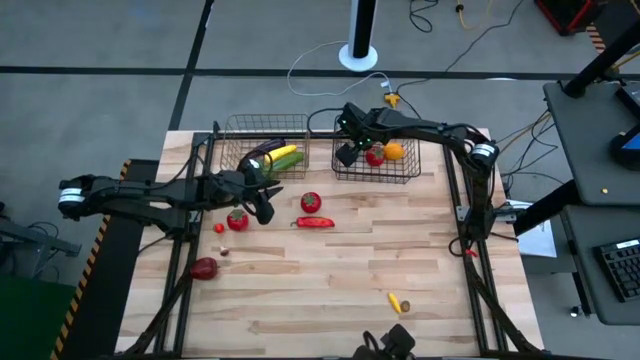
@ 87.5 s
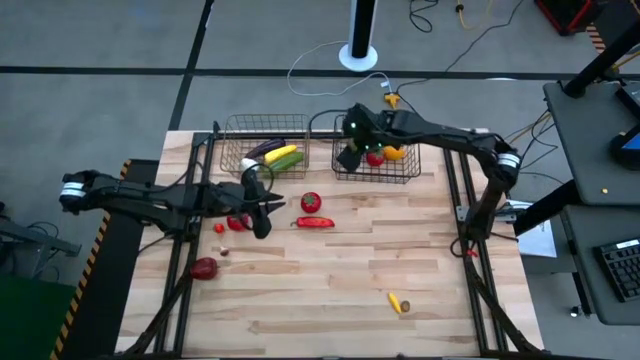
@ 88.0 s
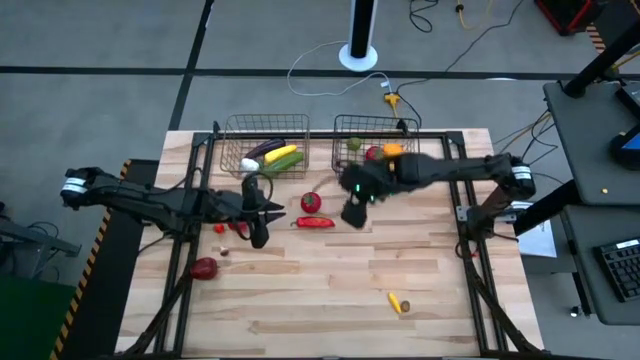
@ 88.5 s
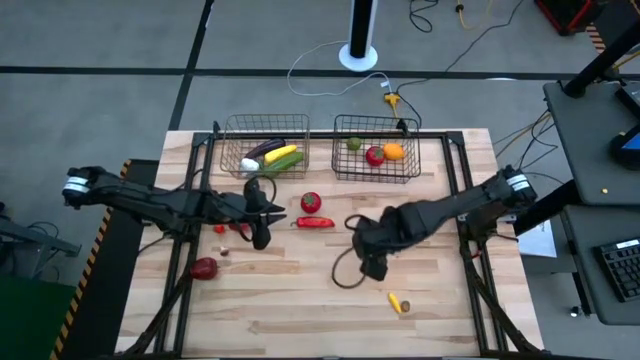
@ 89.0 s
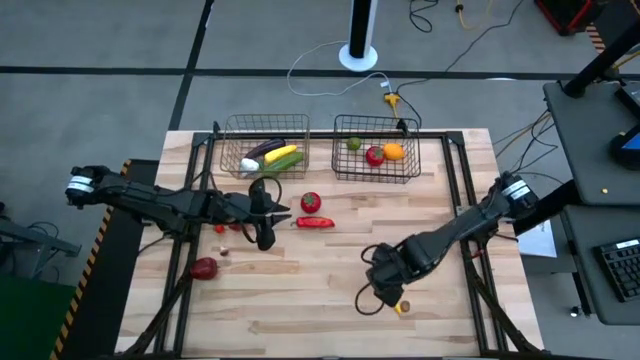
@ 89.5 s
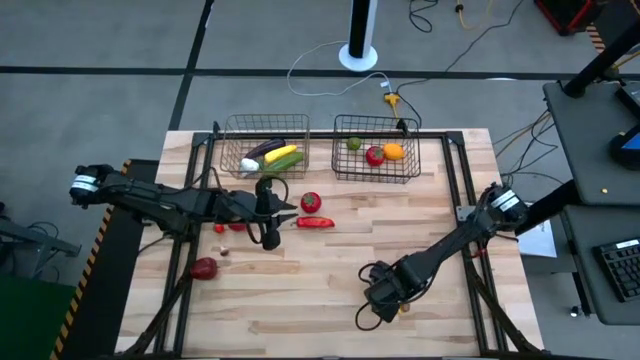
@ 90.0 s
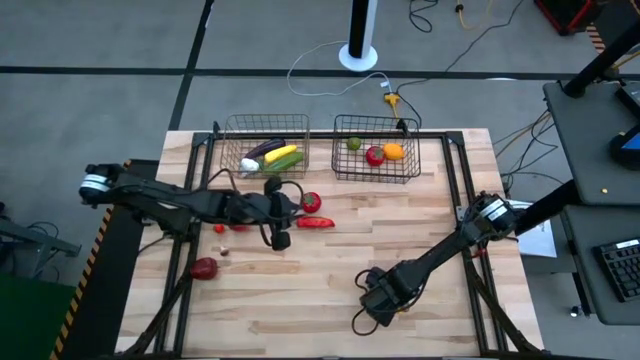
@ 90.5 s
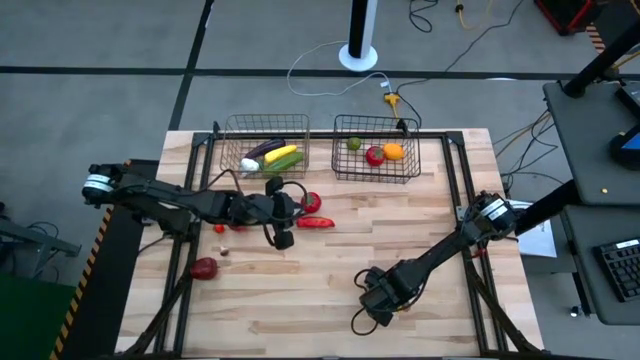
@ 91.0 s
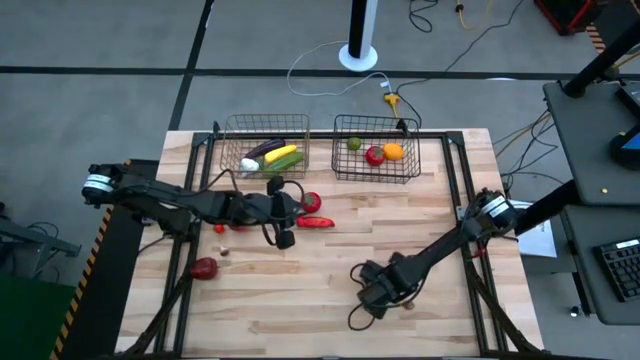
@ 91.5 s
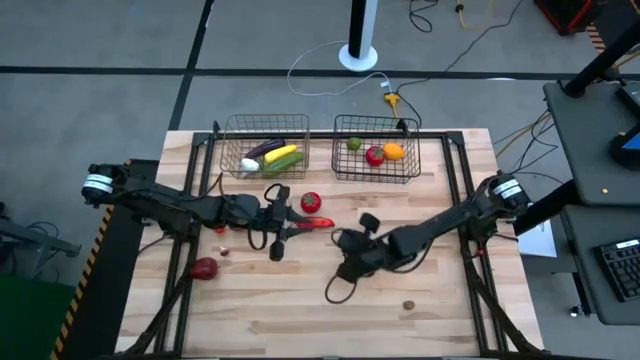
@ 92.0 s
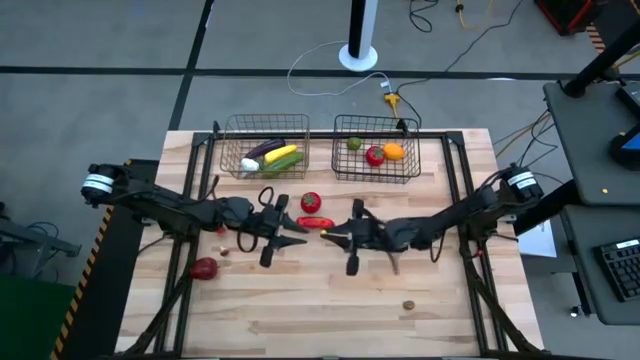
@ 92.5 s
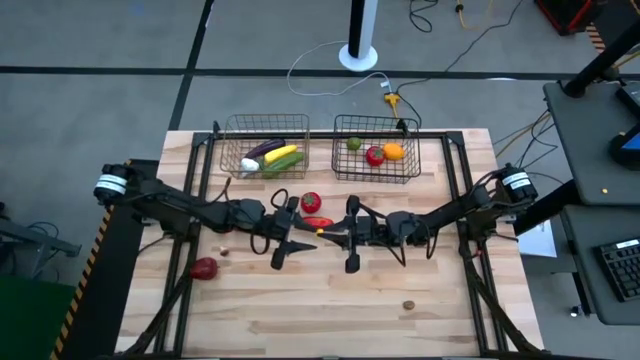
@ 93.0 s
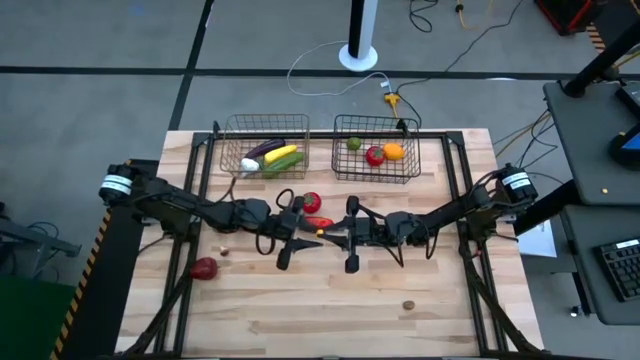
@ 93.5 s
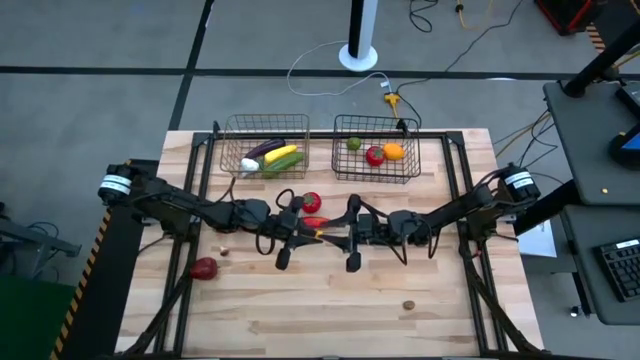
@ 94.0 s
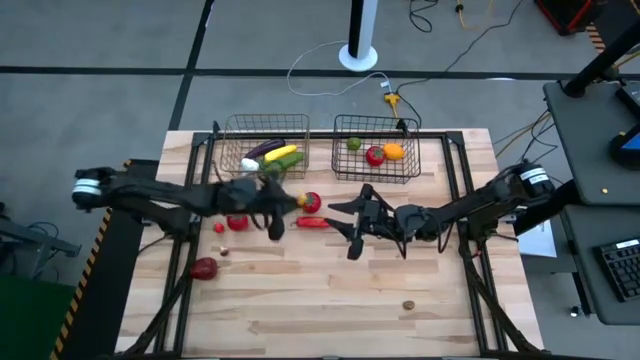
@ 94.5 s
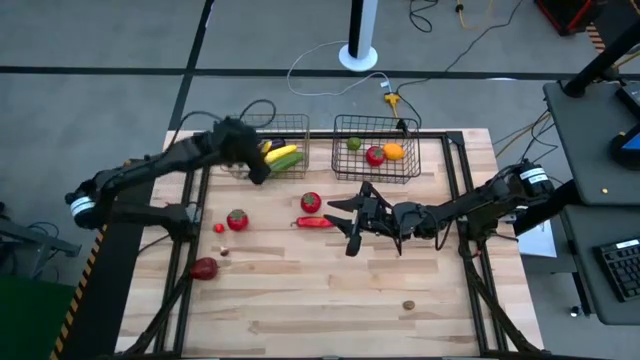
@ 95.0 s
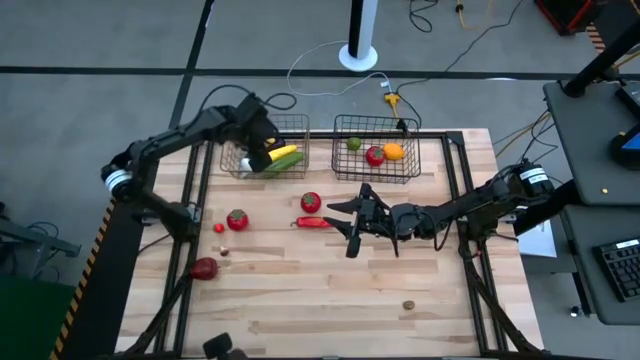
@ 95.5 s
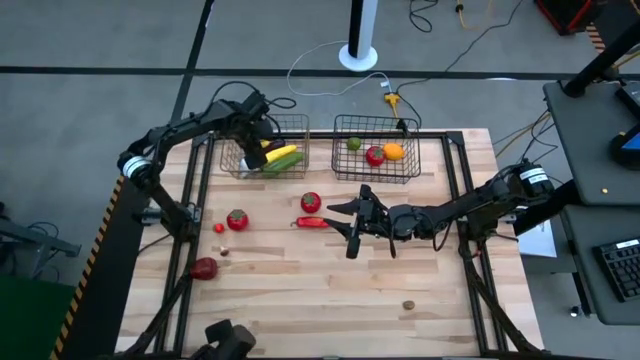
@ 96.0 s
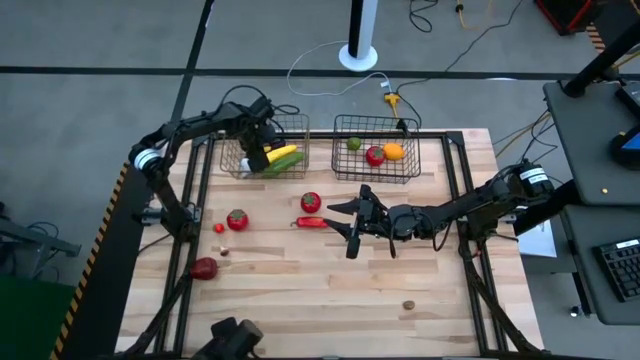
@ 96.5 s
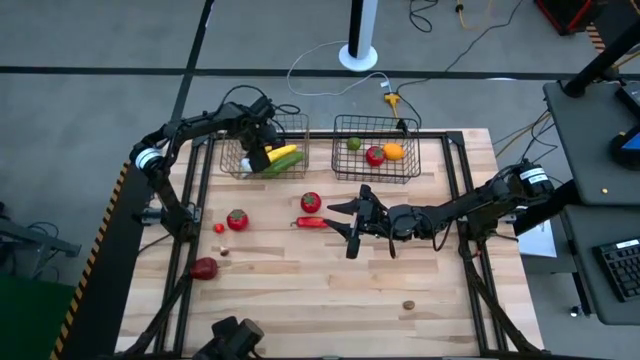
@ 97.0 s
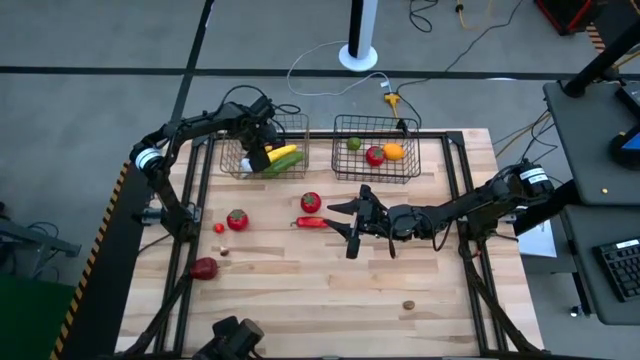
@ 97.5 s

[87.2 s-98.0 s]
Task: Sort produce into baskets
Put the small yellow corn into the left wire basket

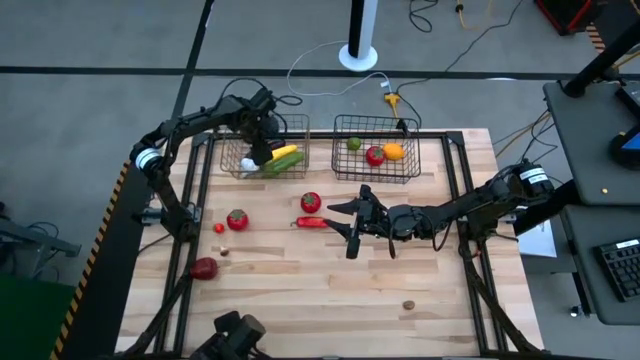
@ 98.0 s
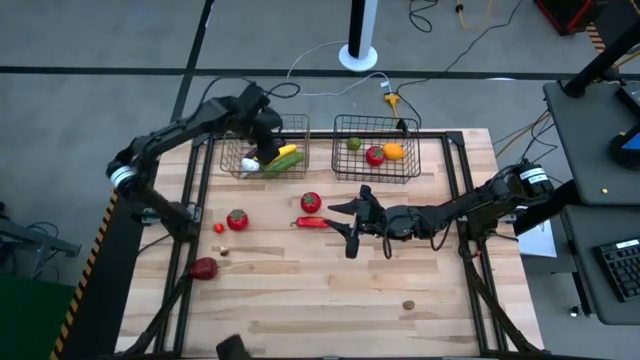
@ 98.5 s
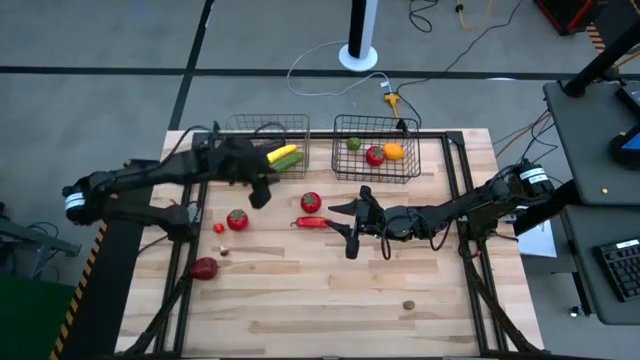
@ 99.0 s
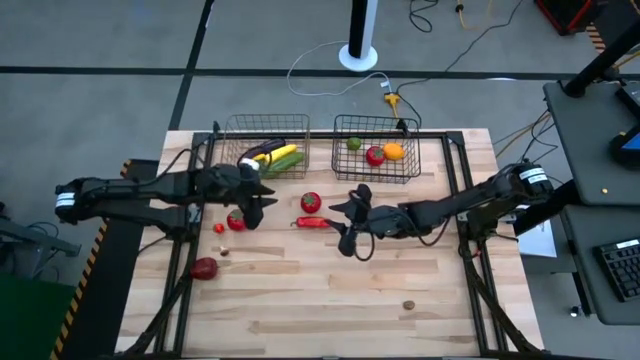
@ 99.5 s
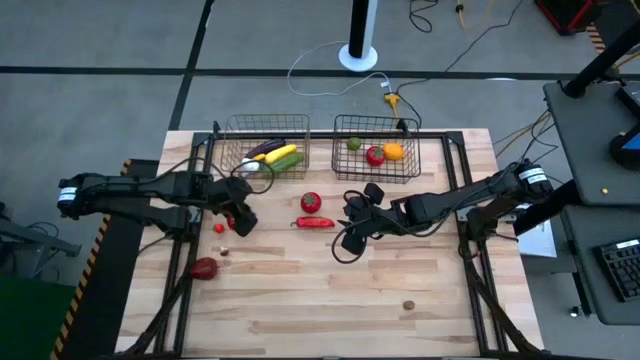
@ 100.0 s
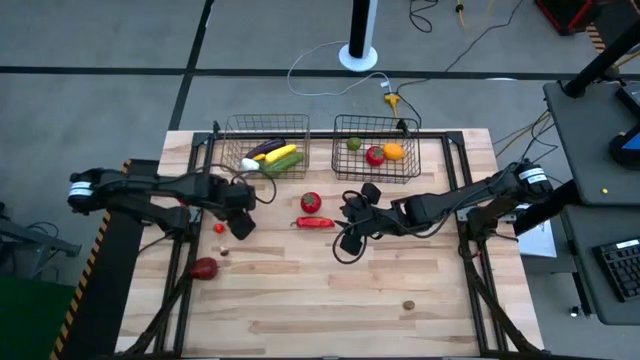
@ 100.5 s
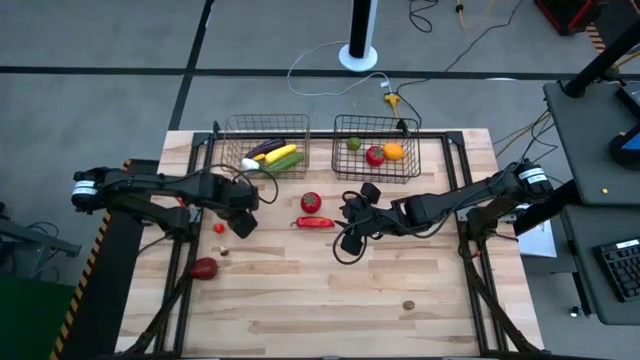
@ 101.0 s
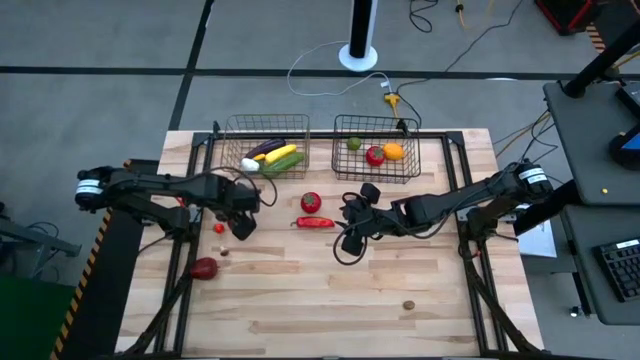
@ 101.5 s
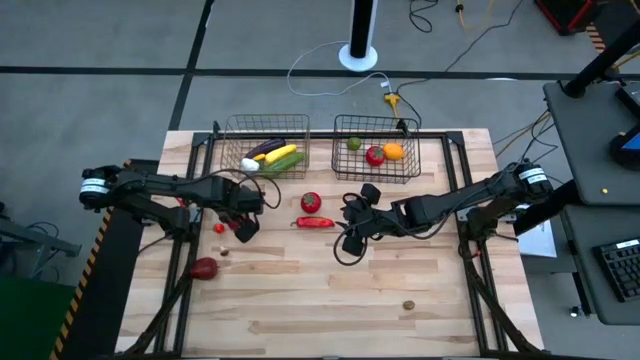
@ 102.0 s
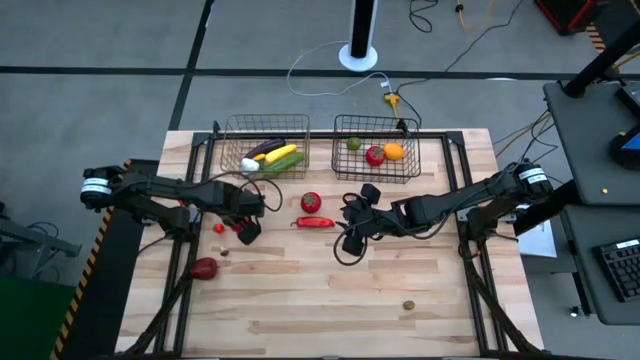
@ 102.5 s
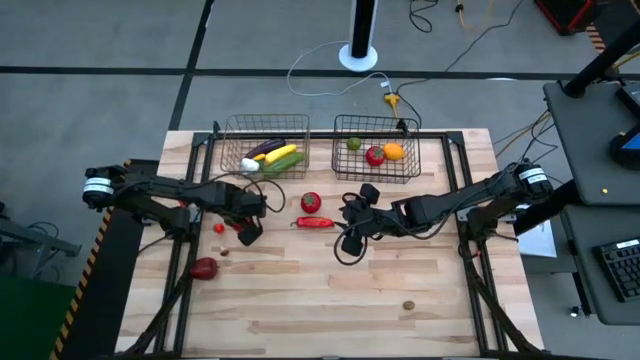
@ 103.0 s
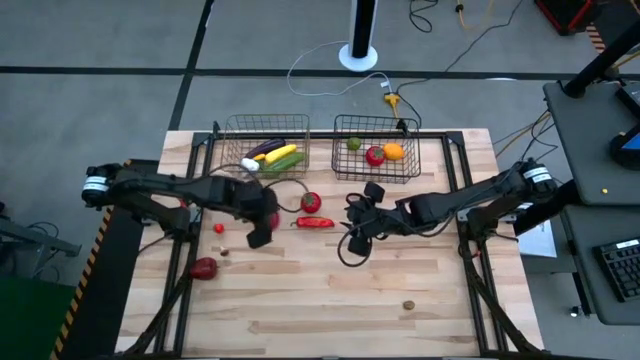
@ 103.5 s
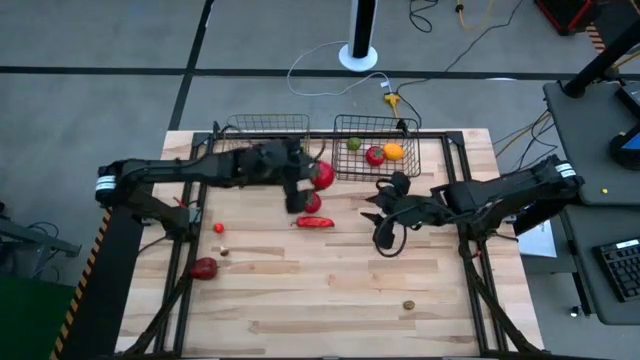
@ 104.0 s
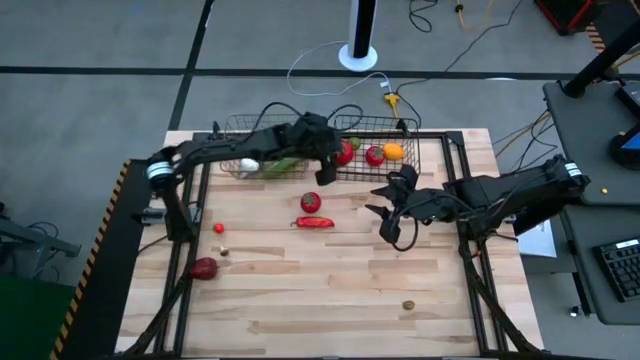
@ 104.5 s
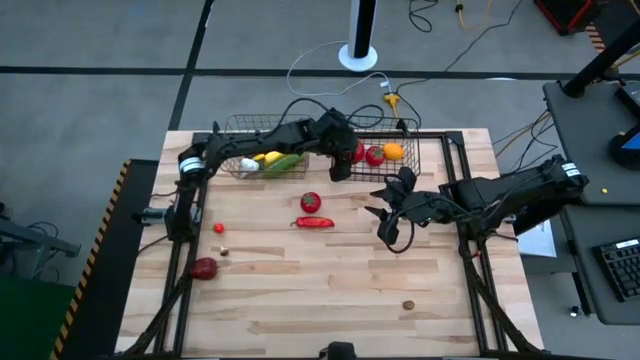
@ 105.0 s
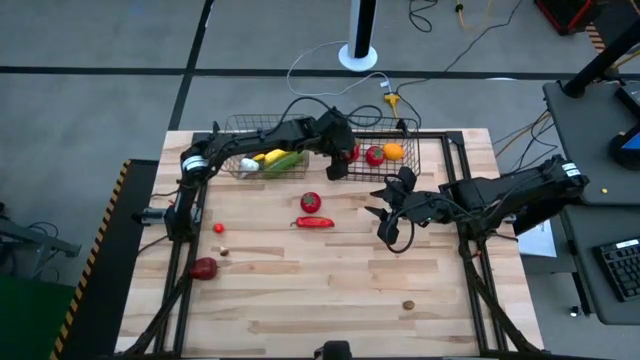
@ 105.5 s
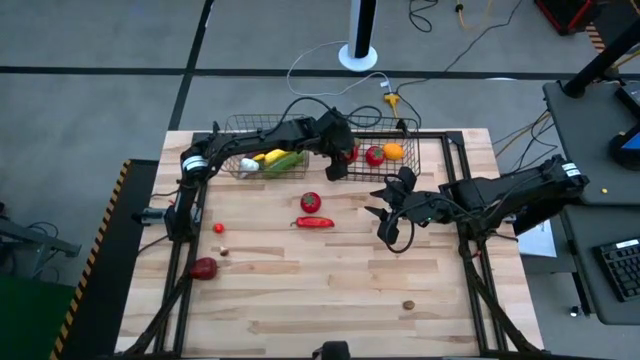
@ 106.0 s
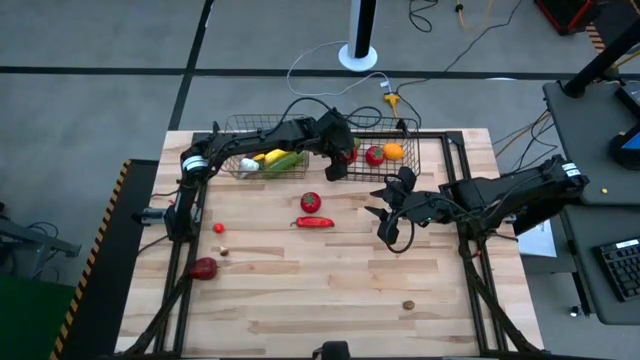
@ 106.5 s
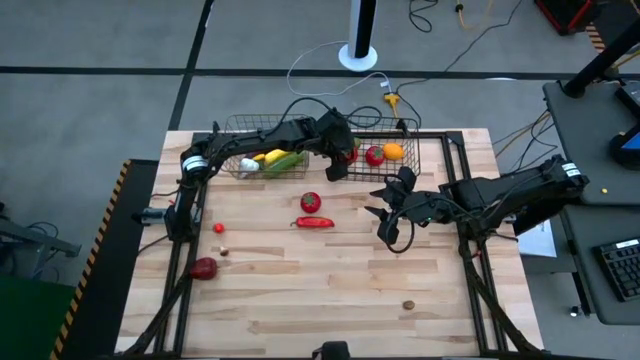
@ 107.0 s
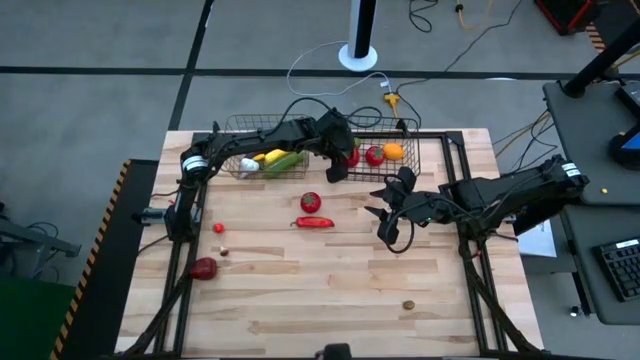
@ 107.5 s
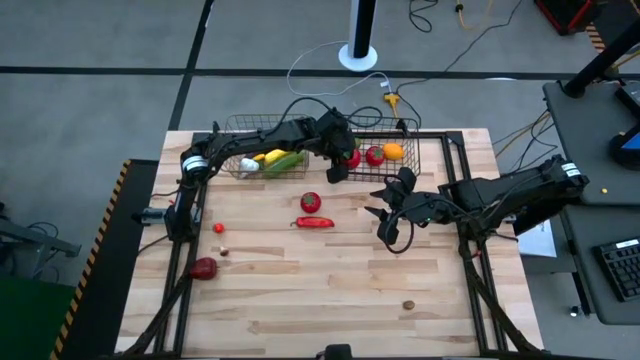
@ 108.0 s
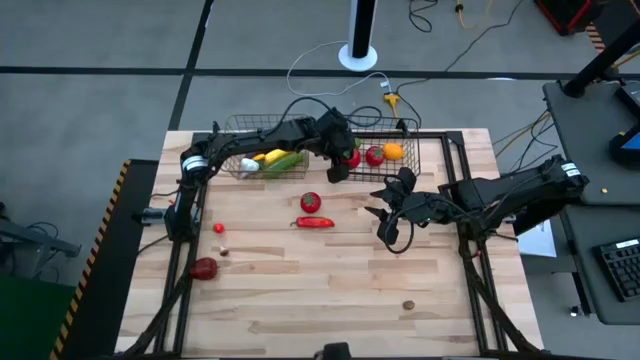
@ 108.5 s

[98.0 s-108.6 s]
Put the left large red tomato into the right wire basket
